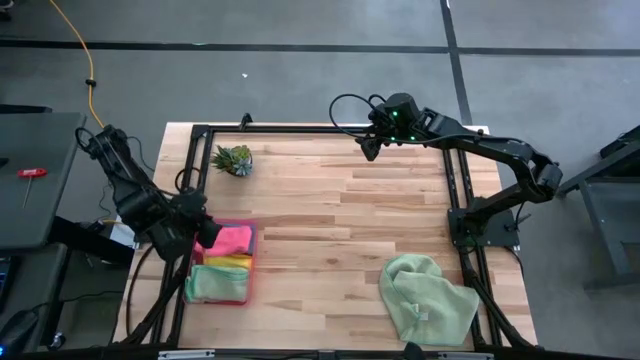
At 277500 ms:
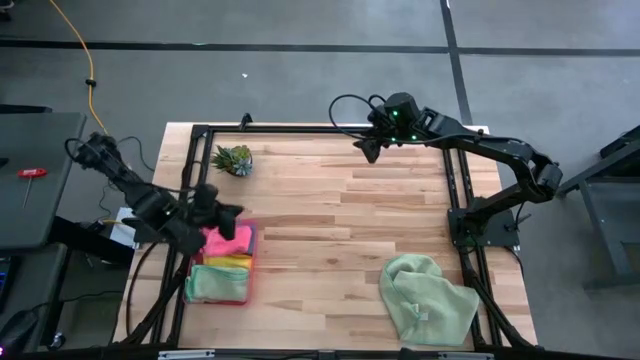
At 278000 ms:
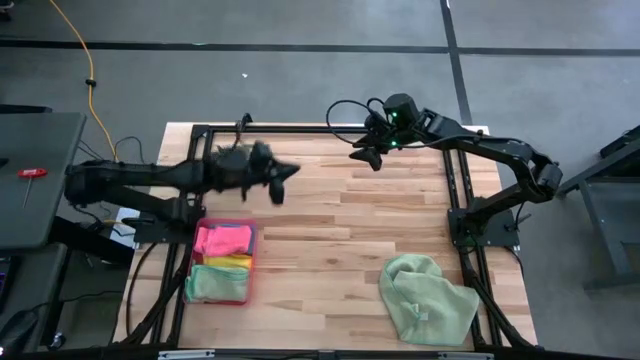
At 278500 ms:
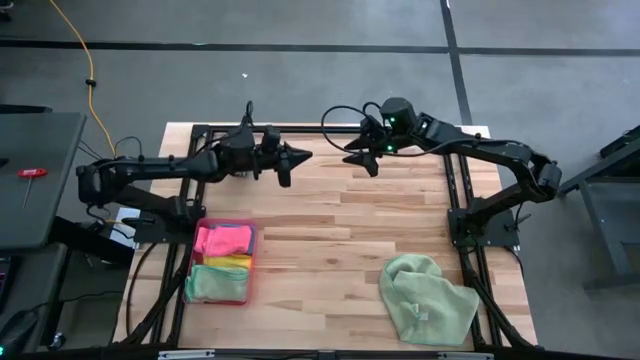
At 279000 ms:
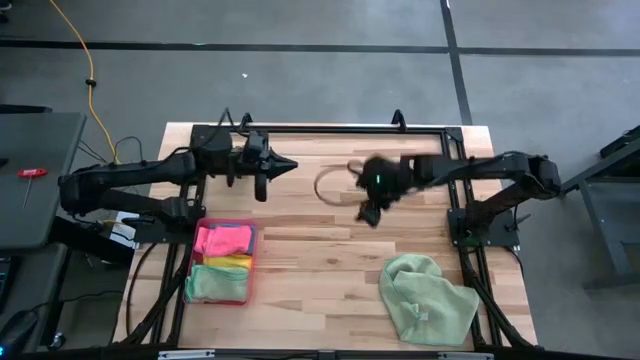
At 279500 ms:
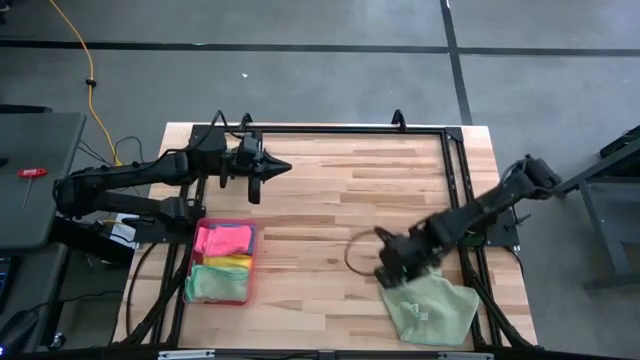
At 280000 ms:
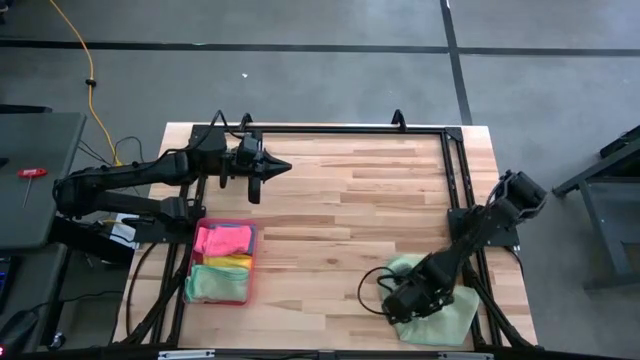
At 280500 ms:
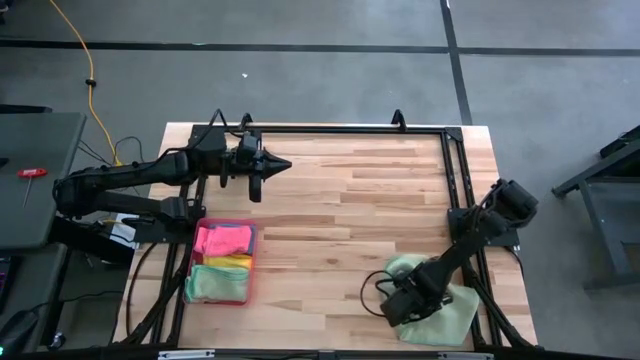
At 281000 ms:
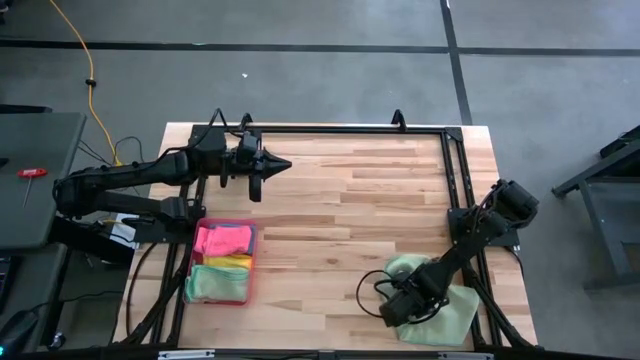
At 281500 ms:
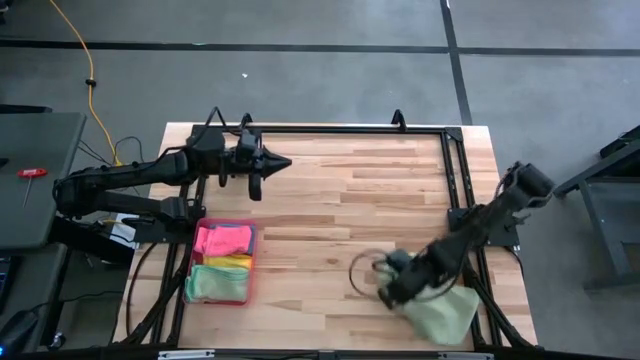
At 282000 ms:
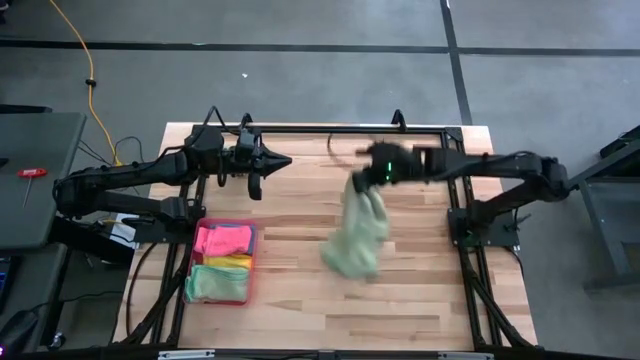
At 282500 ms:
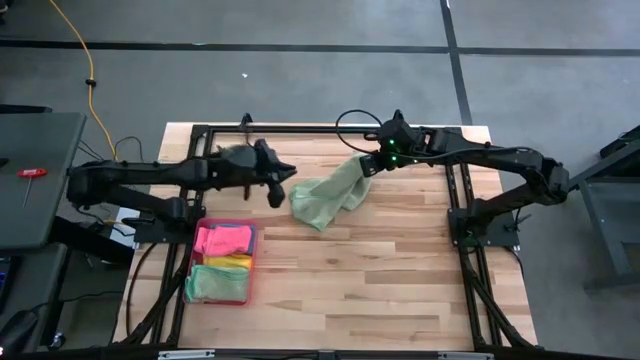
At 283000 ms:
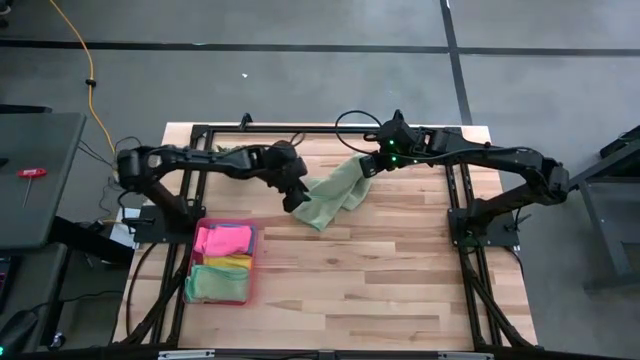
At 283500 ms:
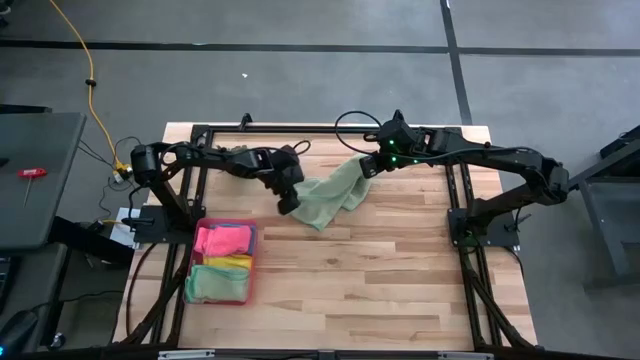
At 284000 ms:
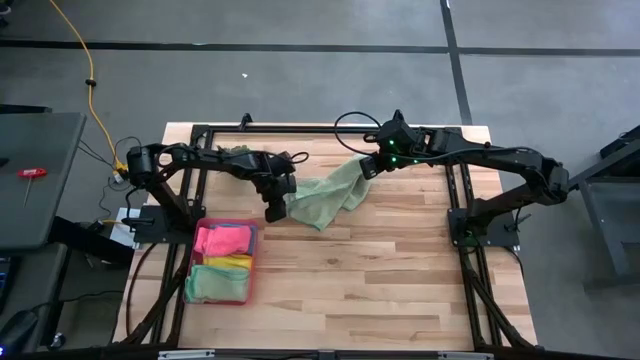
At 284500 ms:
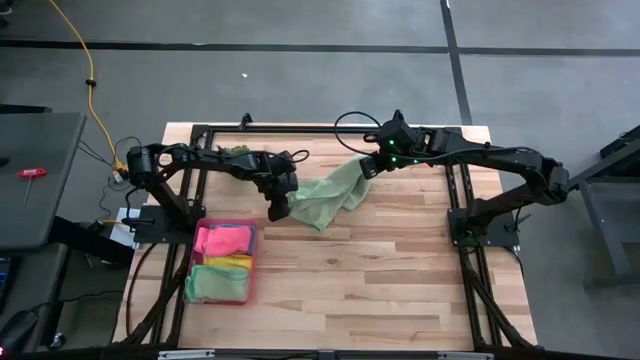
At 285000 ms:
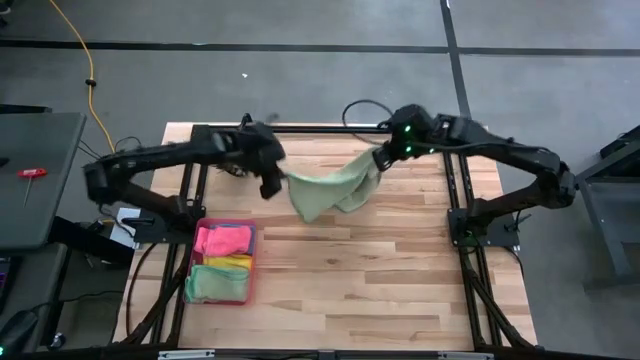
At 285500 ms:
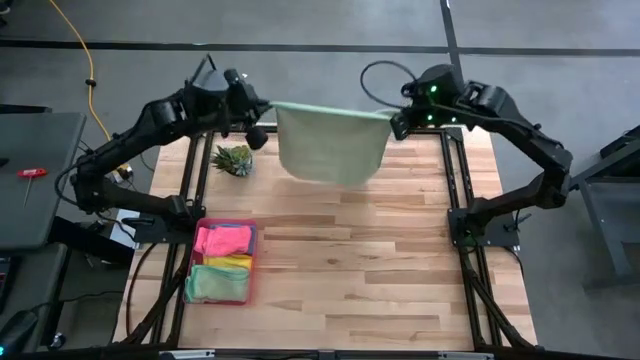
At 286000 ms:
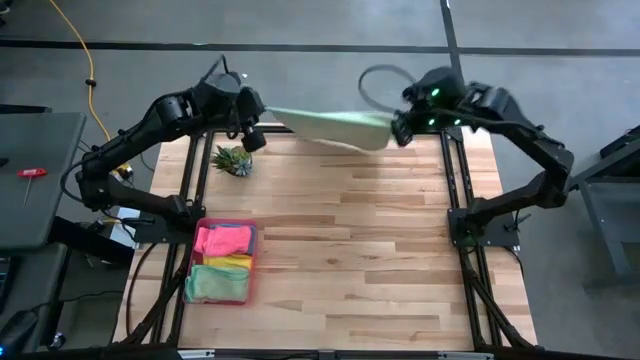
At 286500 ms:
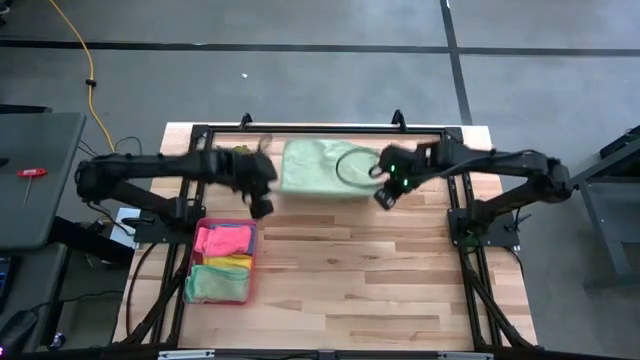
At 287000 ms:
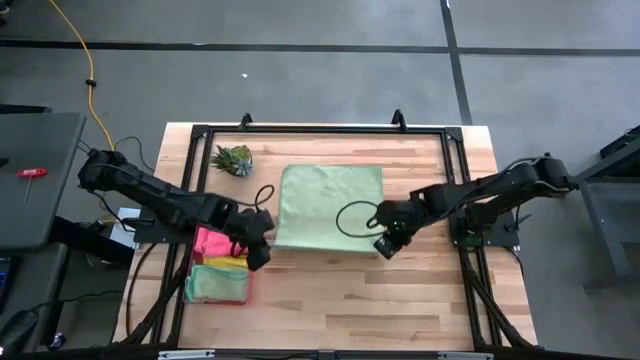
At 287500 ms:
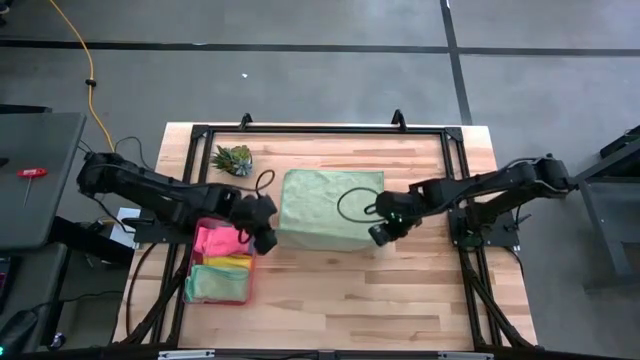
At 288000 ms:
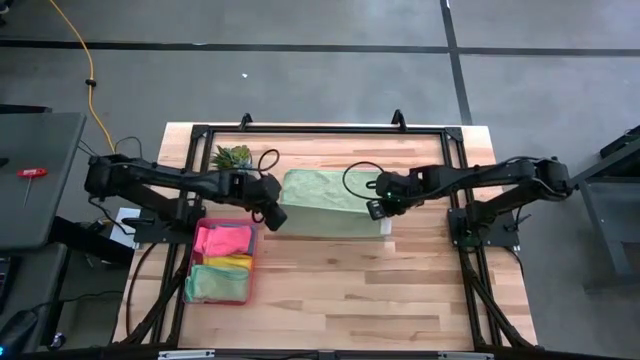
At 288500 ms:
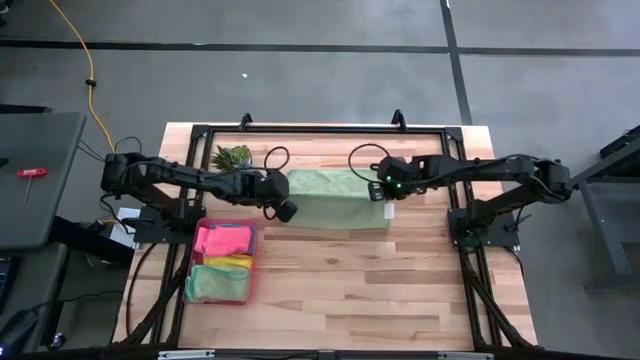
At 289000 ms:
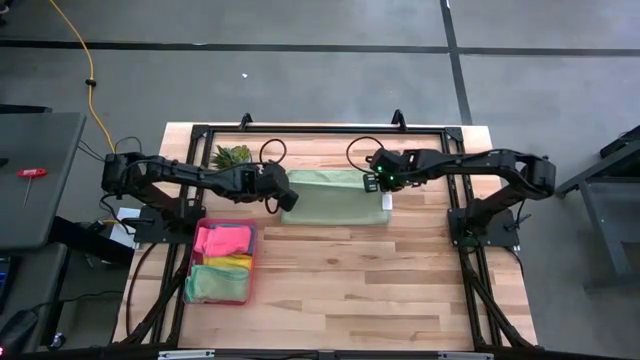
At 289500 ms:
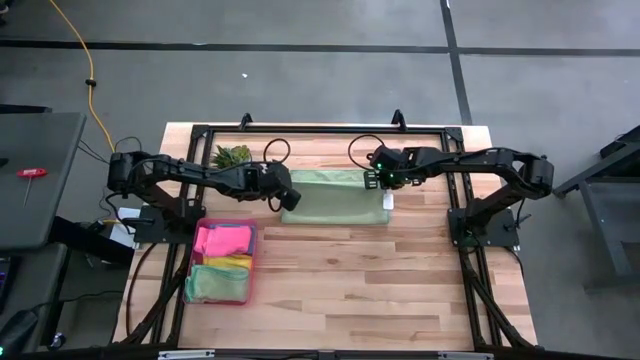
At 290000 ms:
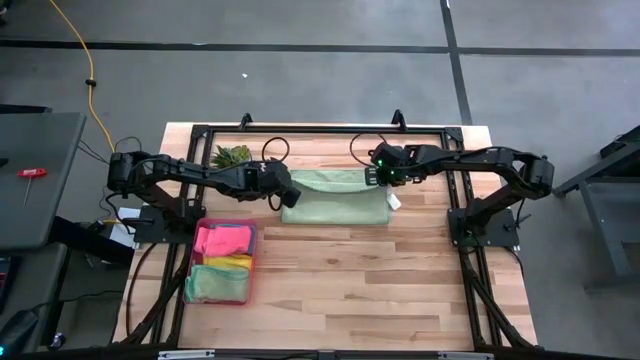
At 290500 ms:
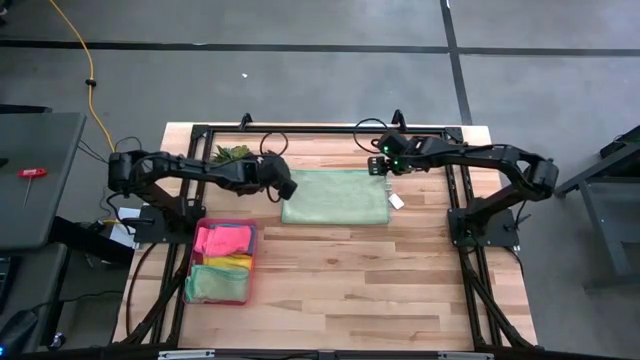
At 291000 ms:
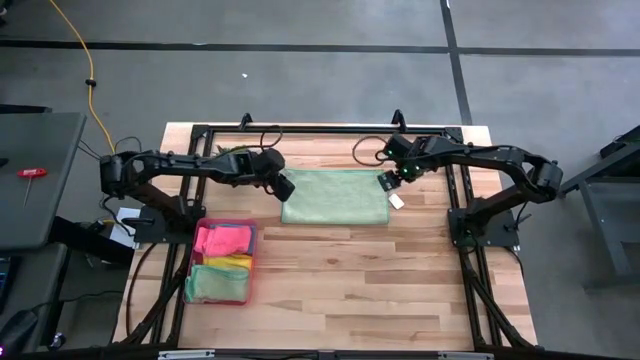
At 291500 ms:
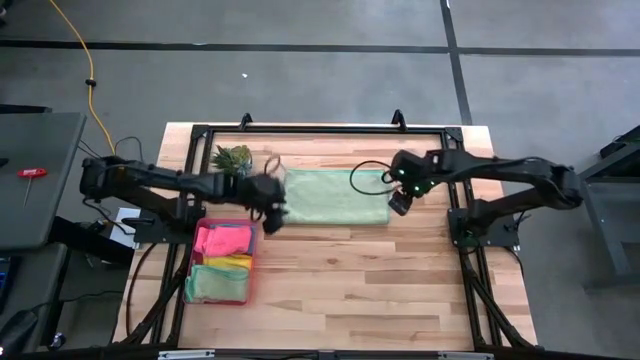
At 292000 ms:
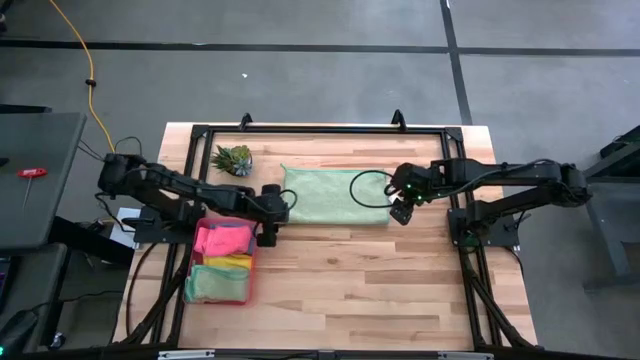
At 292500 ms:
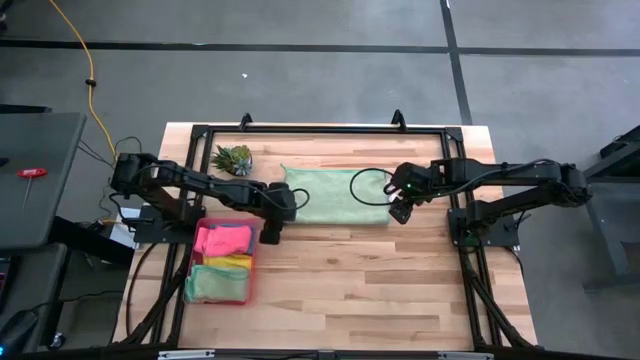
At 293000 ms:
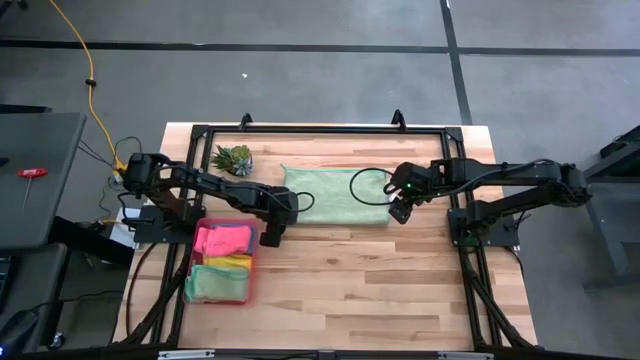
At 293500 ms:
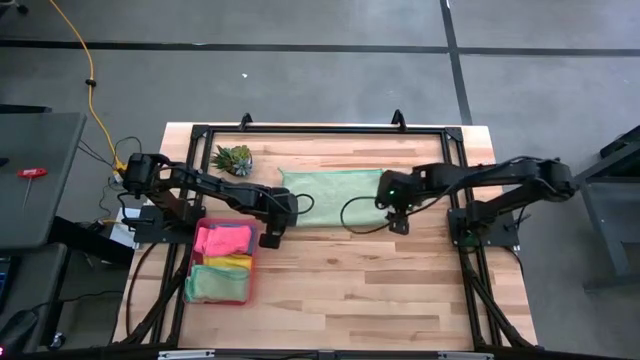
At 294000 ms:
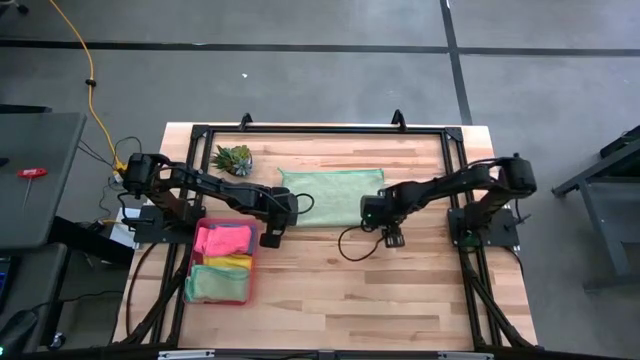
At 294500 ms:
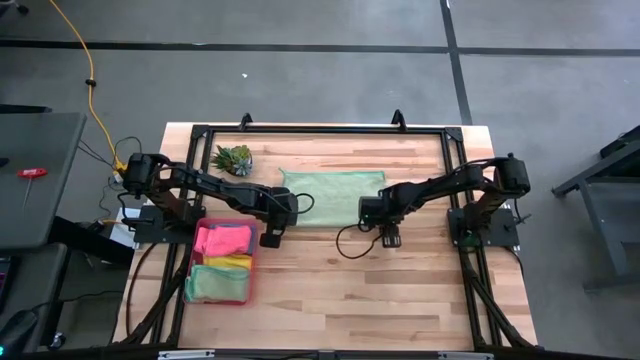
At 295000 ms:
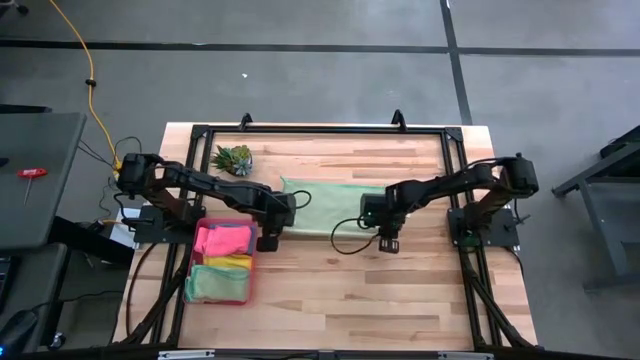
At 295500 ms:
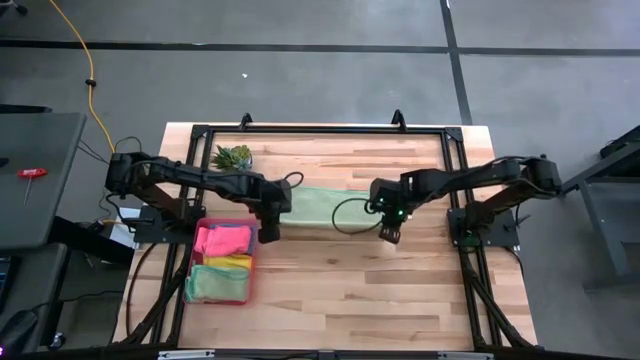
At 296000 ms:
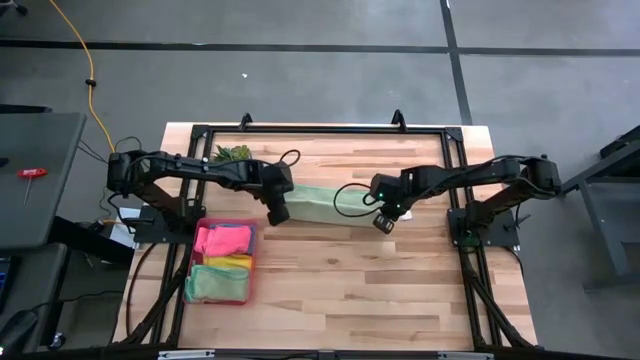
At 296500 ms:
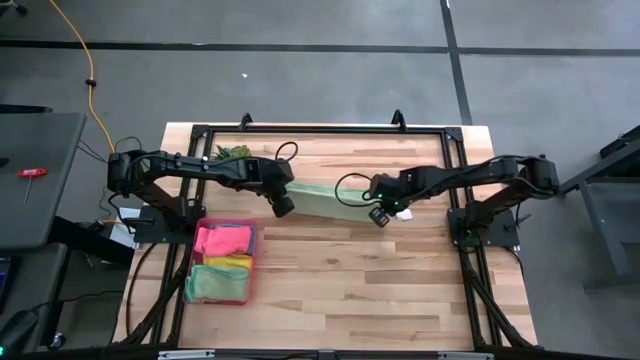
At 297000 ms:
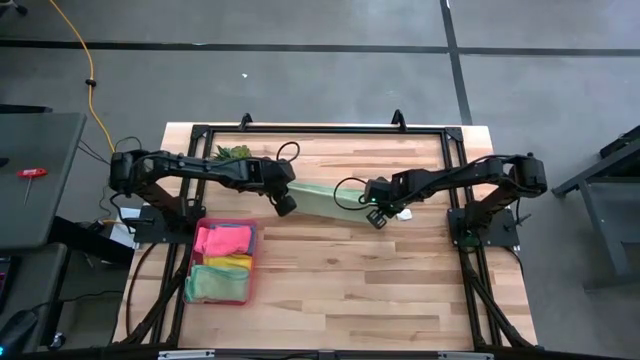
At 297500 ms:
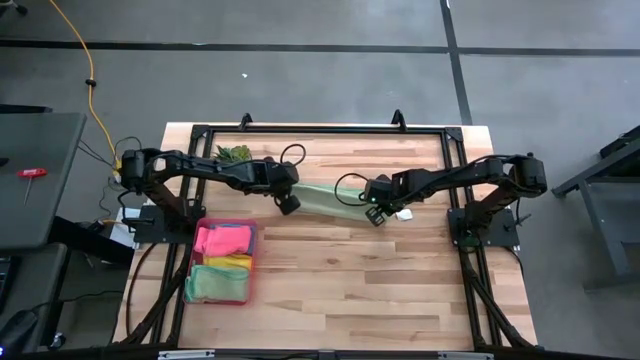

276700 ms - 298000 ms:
Task: Fold microfiber towels
Fold the green microfiber towel
